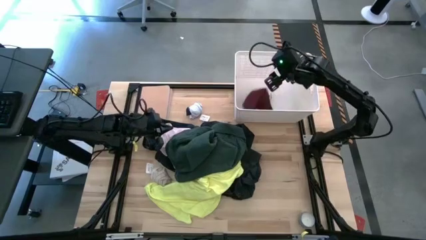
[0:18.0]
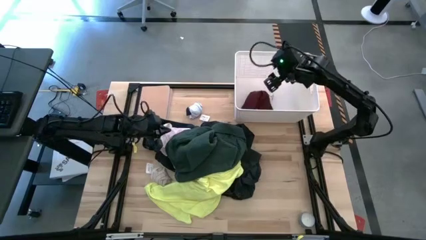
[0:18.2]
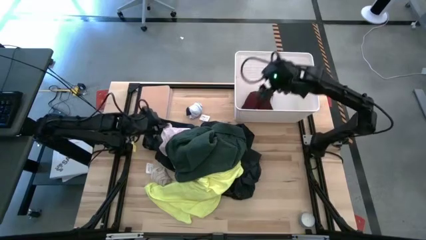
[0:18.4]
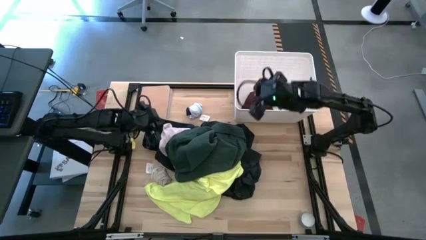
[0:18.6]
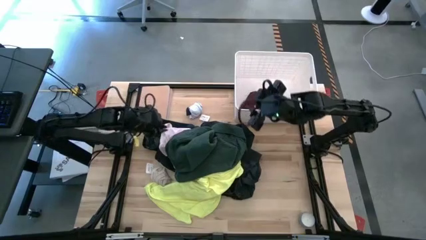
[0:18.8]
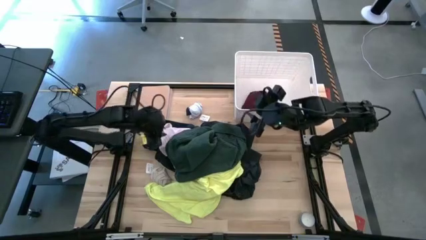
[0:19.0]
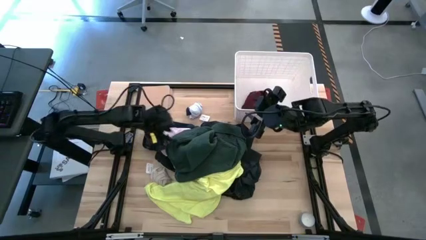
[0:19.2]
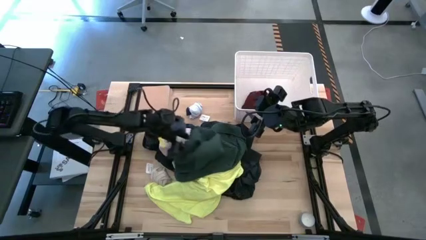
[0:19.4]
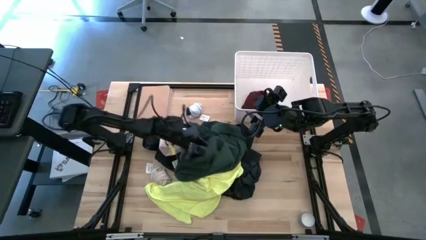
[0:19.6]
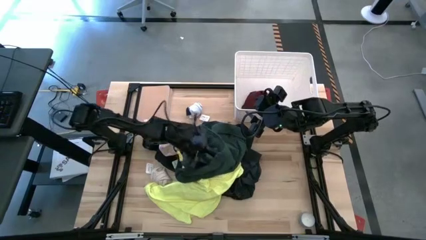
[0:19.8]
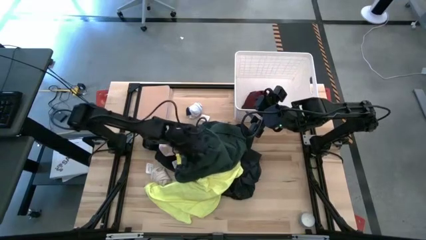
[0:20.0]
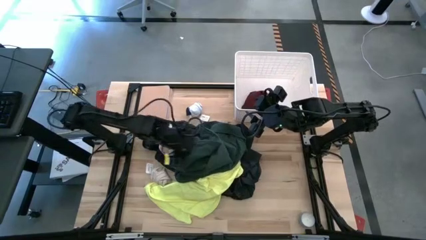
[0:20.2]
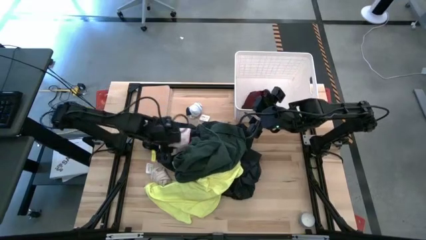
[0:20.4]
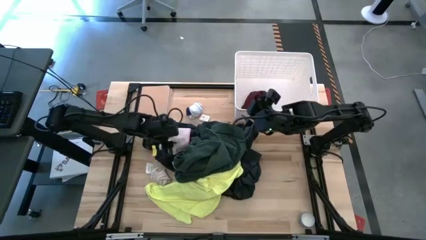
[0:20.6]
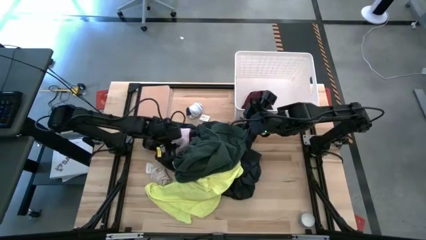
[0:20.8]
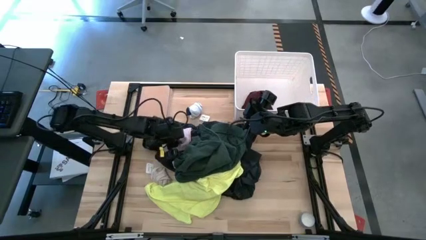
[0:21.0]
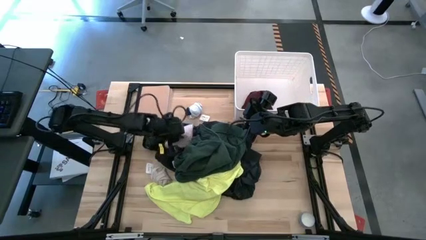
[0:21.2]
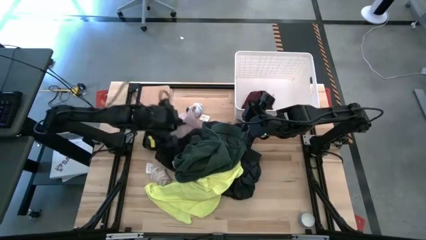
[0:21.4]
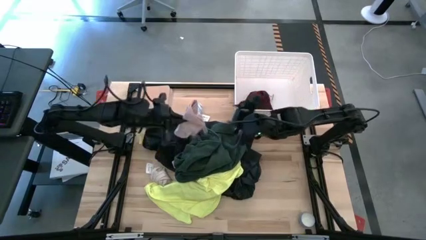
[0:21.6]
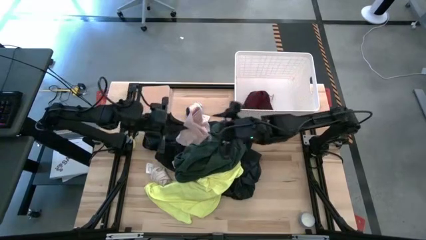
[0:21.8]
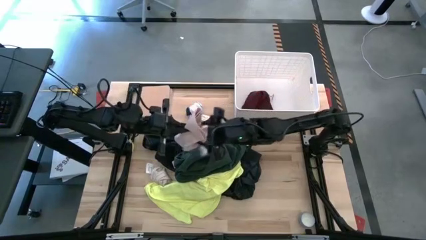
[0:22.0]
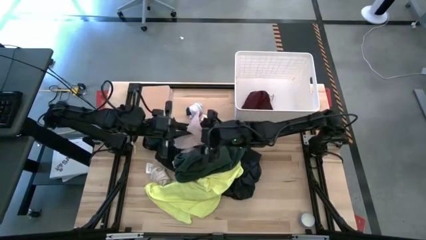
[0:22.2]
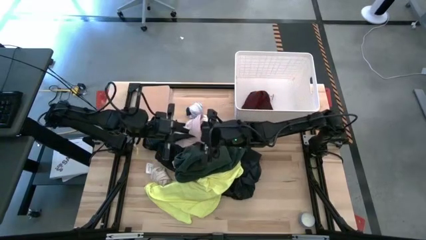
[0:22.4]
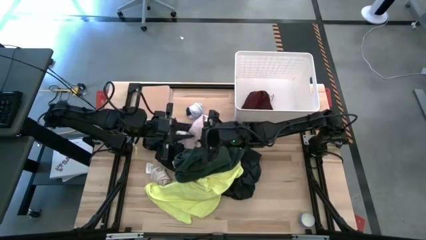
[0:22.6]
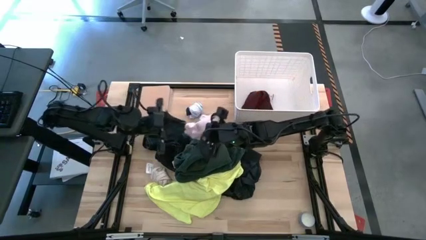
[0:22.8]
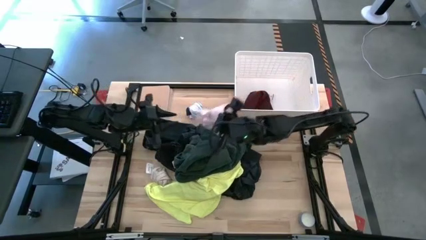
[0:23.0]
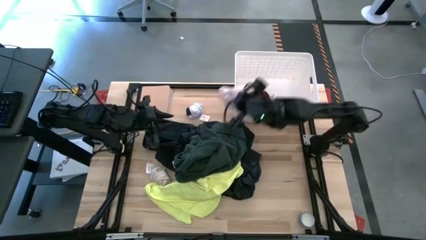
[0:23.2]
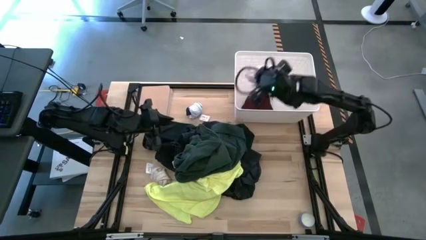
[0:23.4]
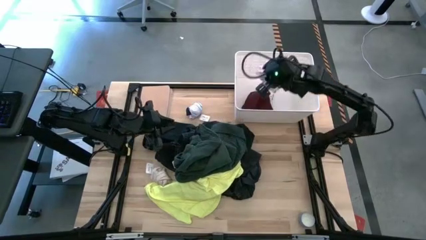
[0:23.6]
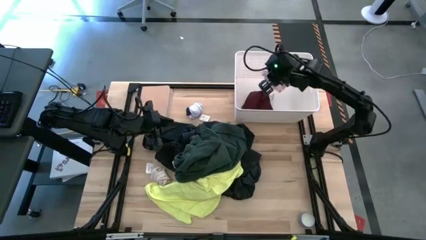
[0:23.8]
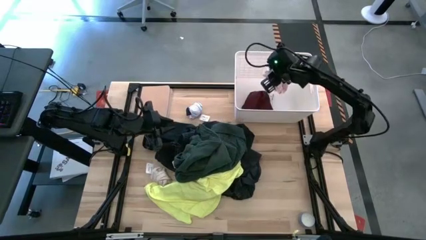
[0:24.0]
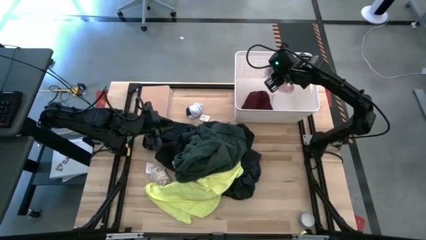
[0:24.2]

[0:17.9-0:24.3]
Task: Sort clothes
Put the pink underwear into the white laundry bin

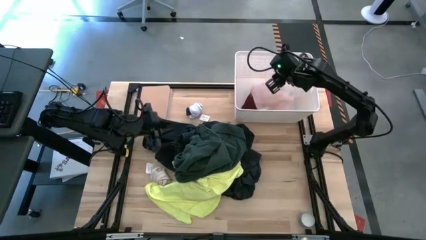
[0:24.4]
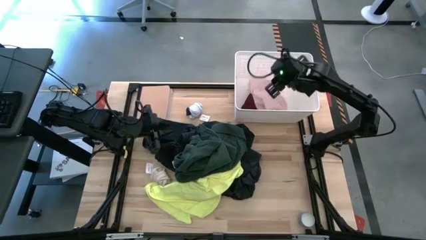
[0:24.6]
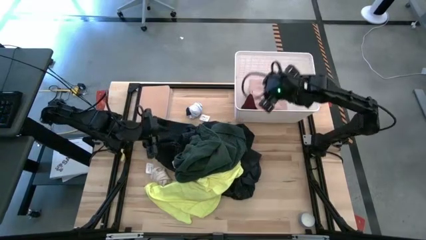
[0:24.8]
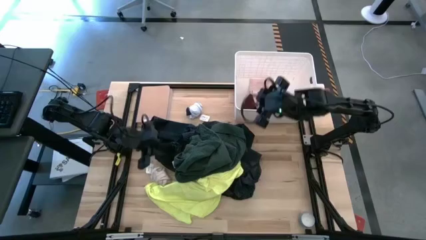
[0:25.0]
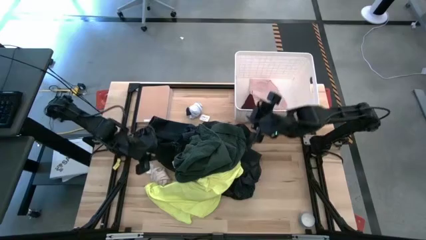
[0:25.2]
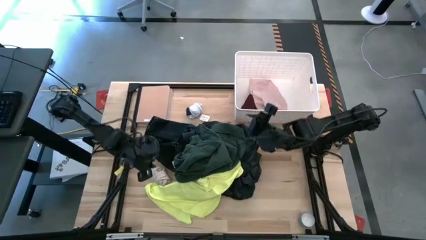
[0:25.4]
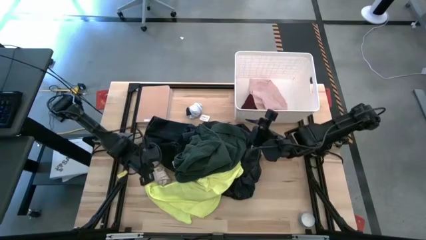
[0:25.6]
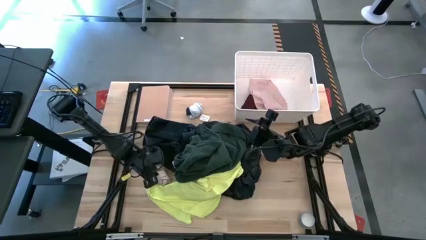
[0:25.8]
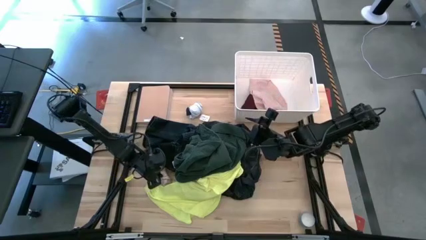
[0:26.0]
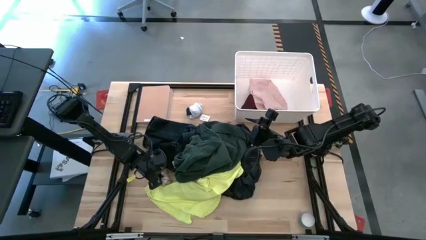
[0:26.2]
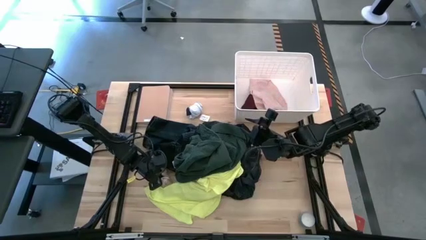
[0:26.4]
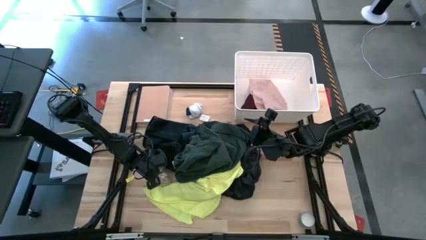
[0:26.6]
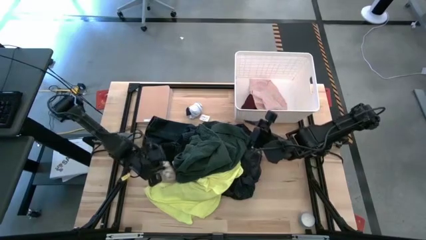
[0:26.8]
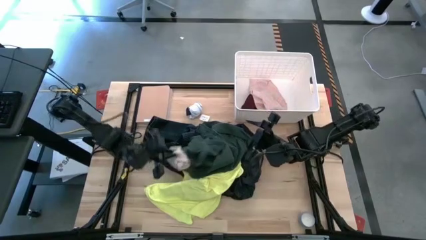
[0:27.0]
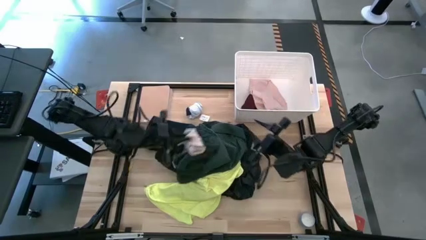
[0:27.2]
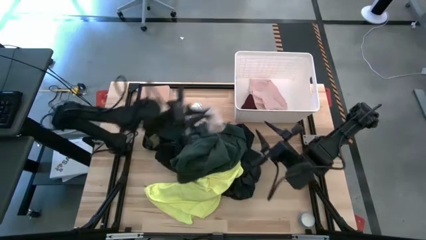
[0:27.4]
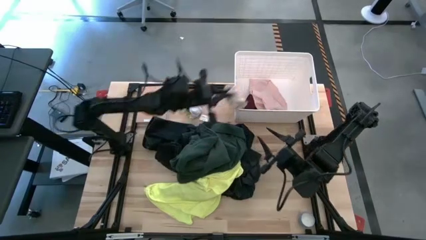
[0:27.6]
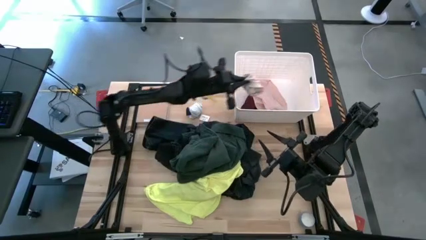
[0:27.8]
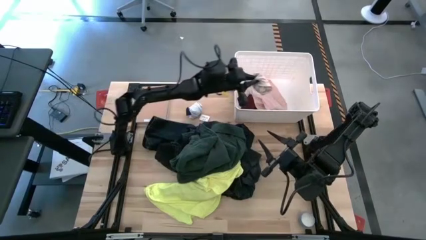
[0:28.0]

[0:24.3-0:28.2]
Put the bottom white patterned sock into the white laundry bin

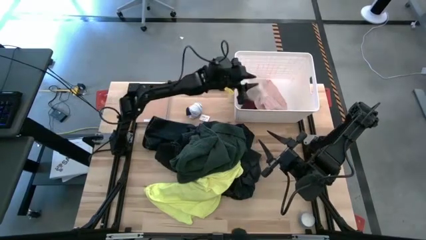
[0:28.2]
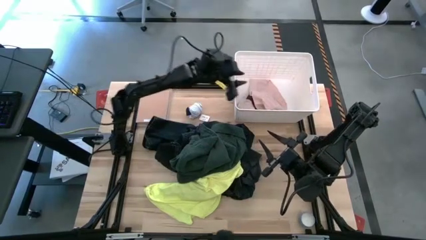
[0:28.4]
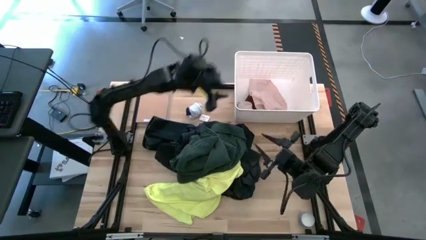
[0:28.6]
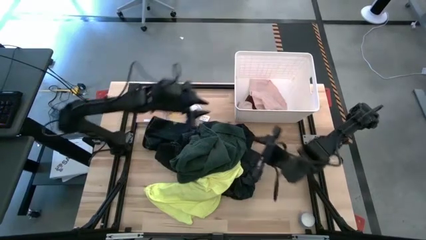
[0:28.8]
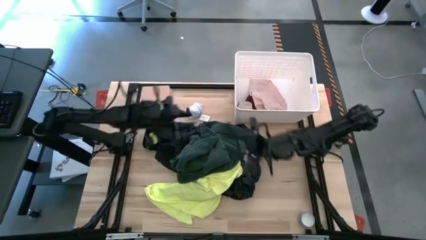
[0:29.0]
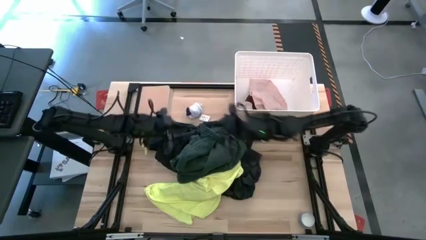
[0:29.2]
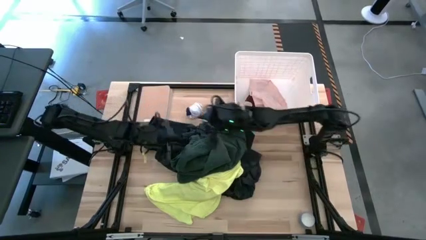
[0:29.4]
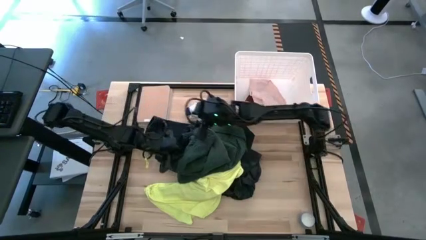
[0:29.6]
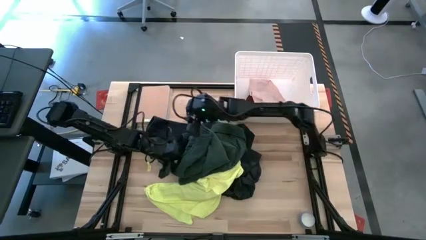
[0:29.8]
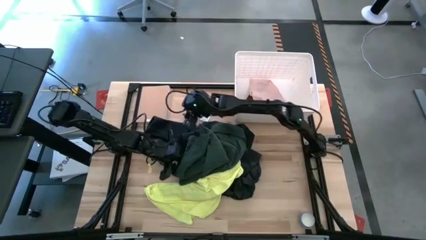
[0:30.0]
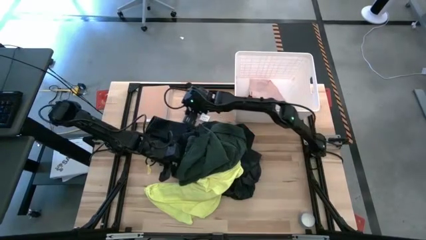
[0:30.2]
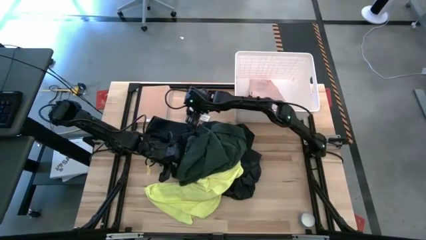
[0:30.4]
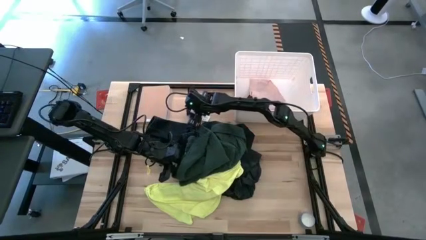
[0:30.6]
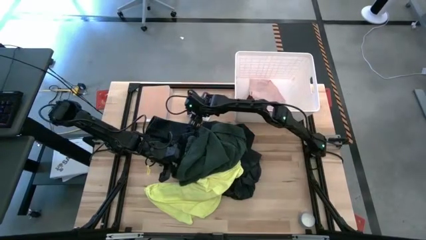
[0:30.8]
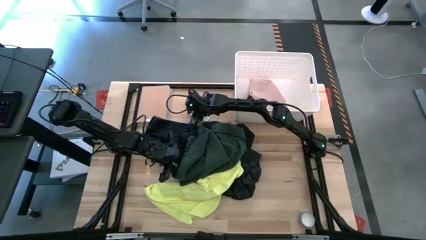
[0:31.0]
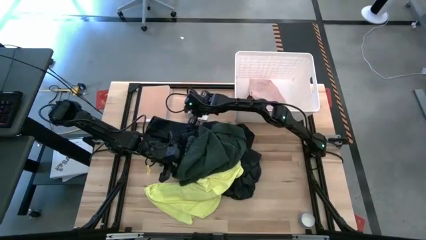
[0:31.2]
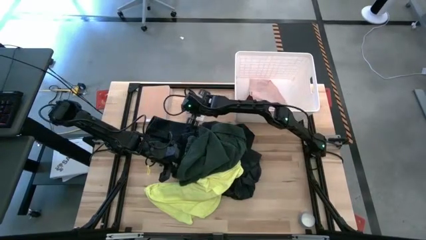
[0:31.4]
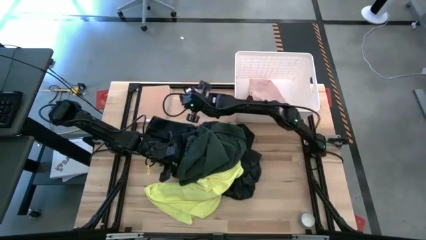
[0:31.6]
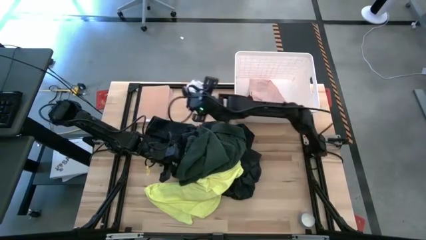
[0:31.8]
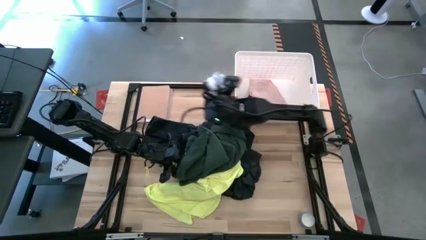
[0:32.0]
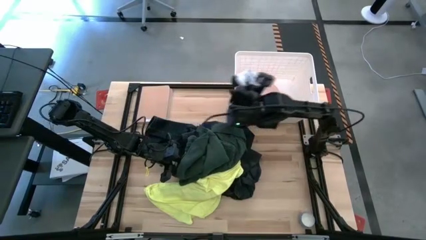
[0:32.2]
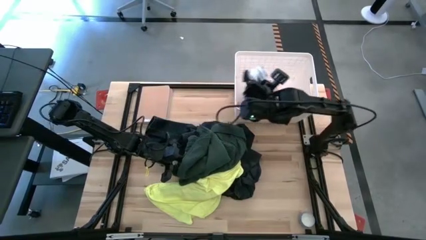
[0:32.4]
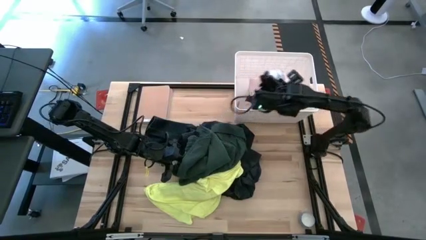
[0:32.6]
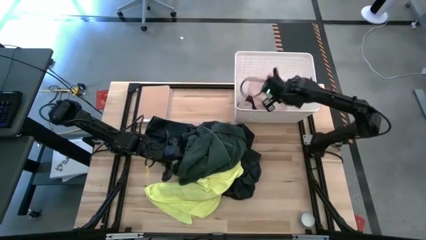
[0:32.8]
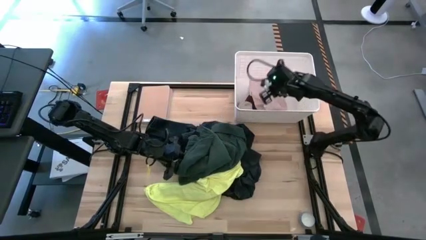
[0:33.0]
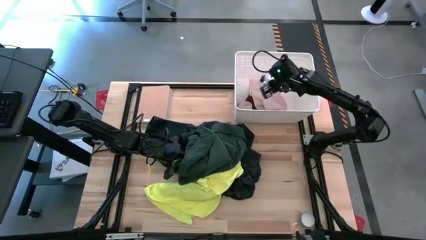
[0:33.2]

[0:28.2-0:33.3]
Put the white patterned sock into the white laundry bin
